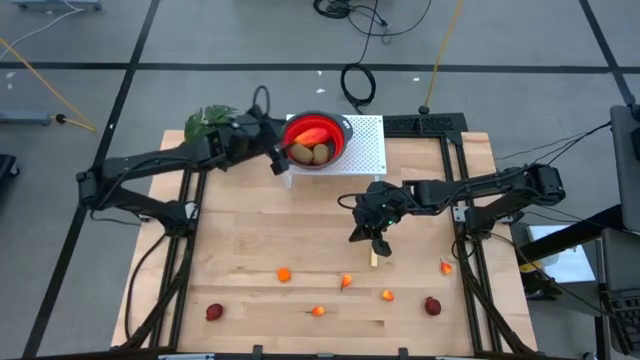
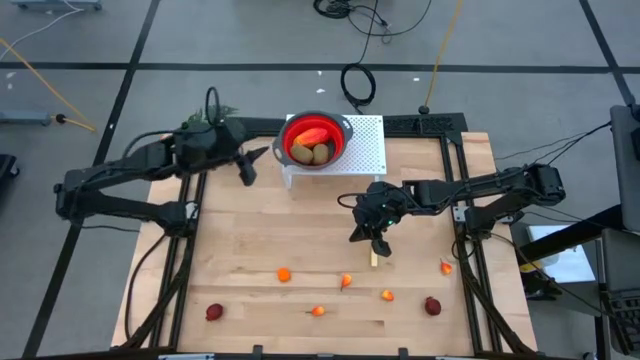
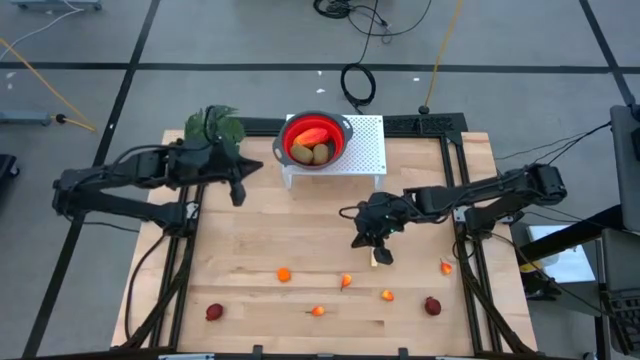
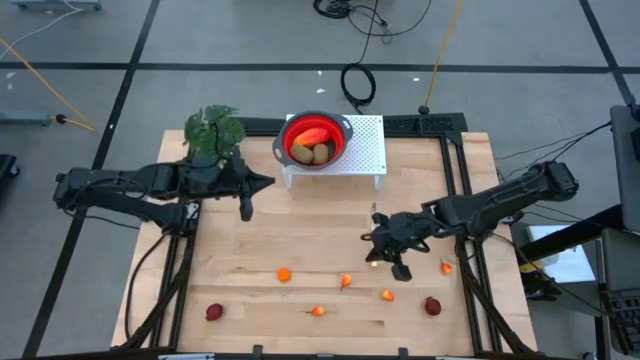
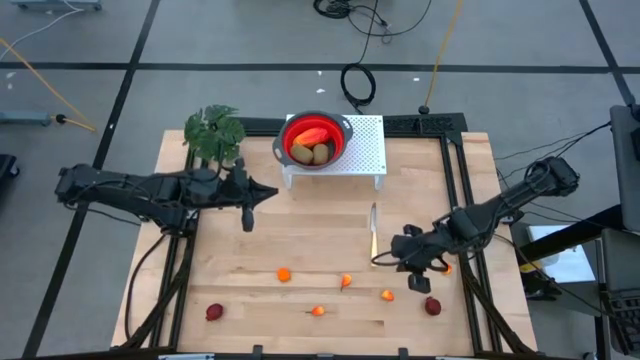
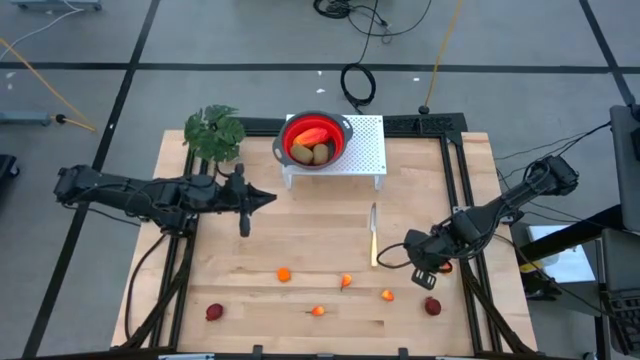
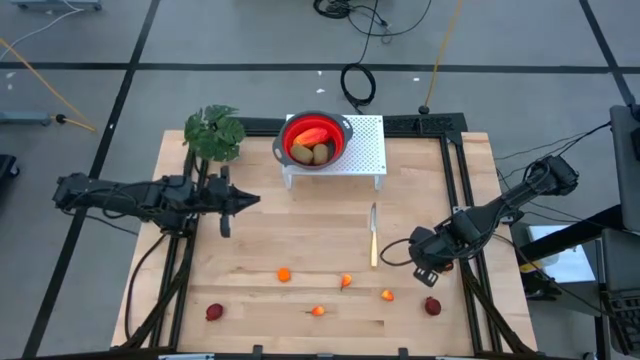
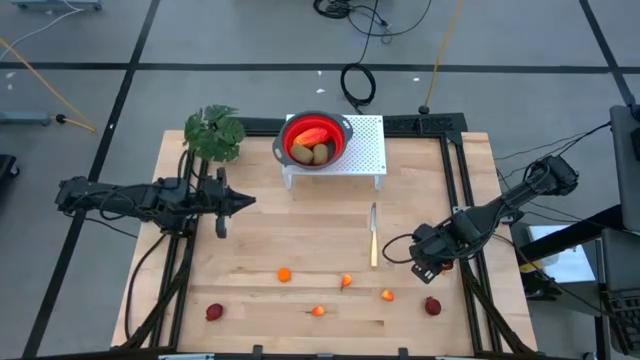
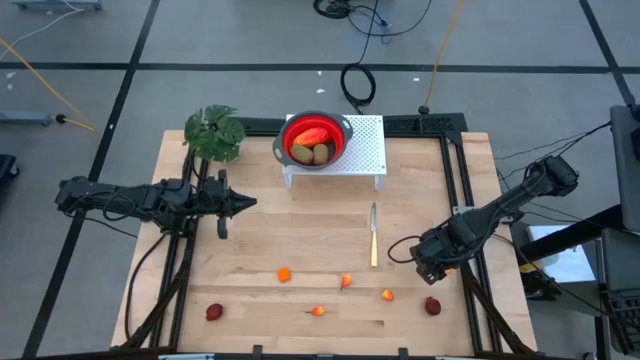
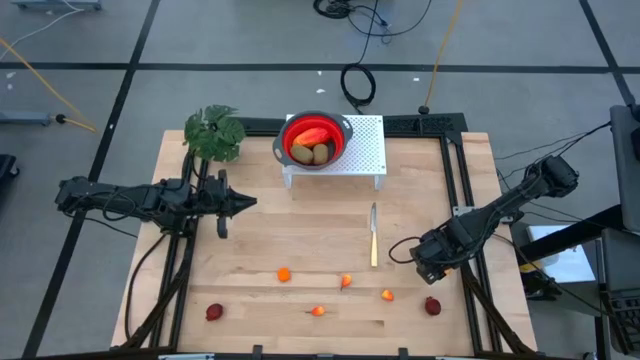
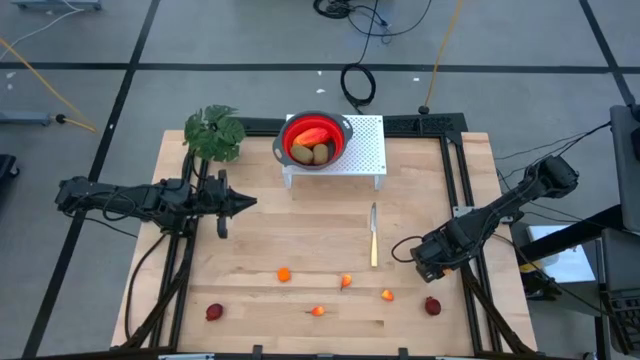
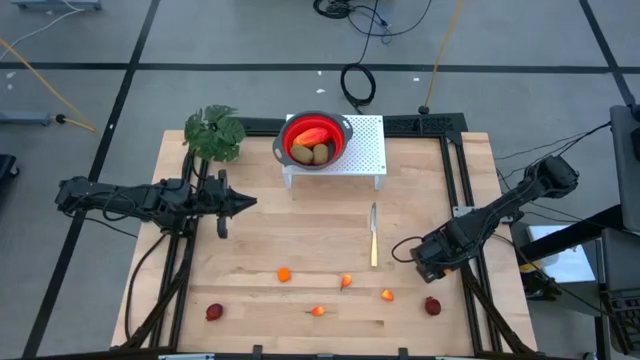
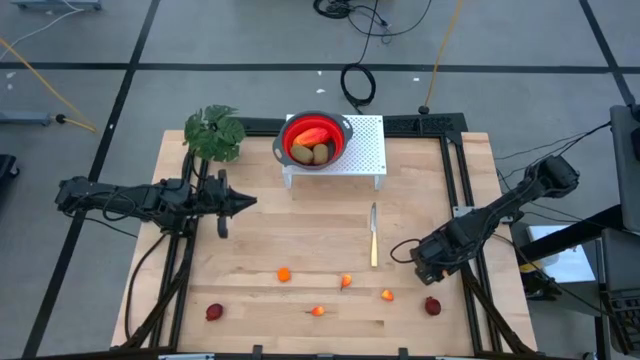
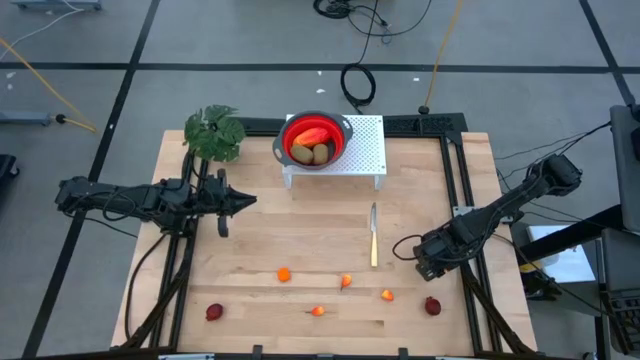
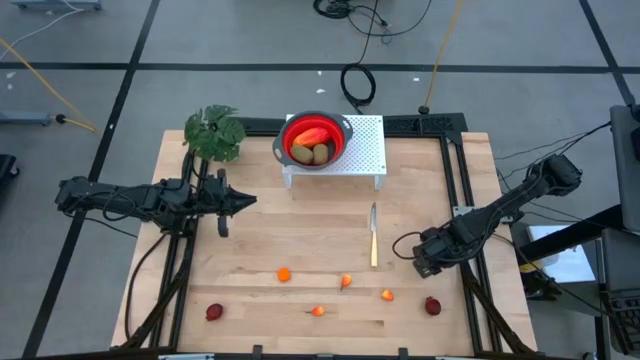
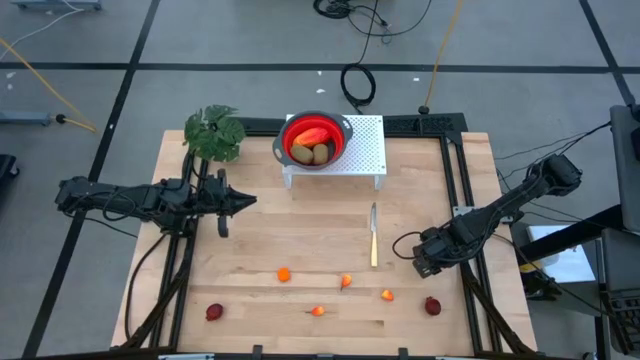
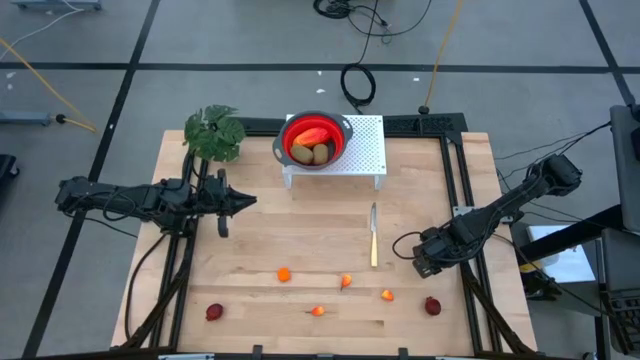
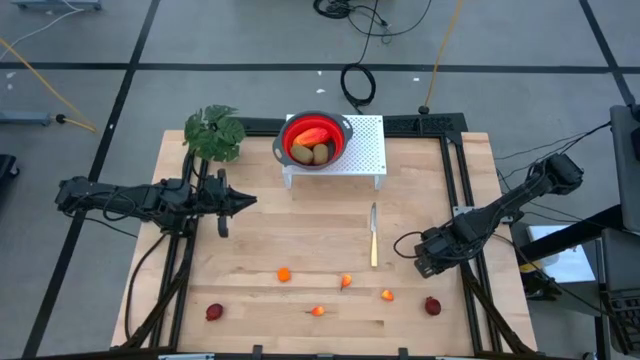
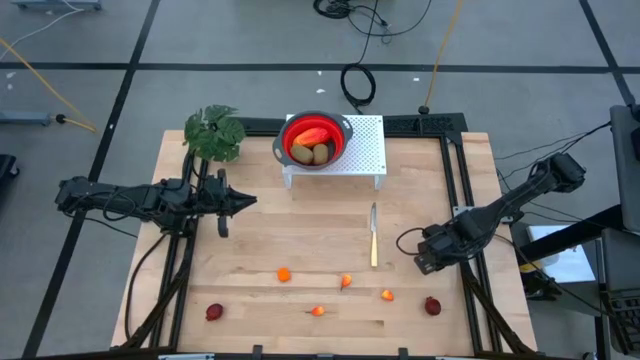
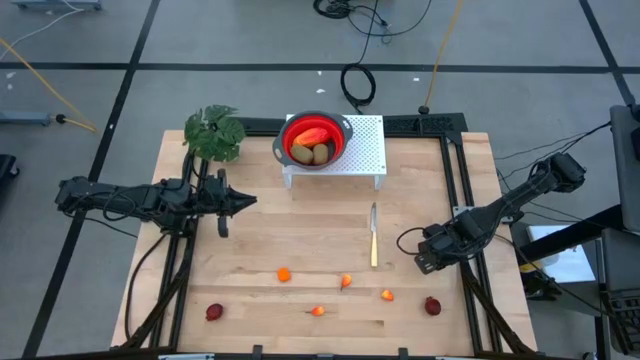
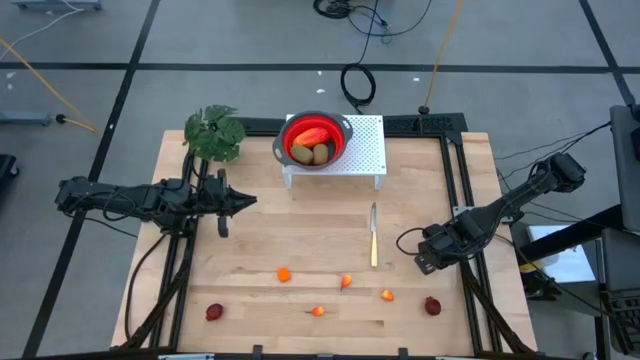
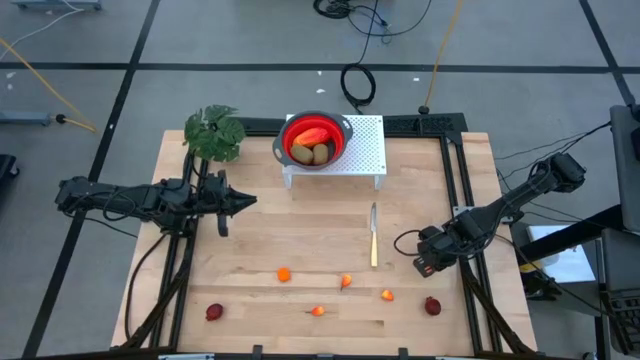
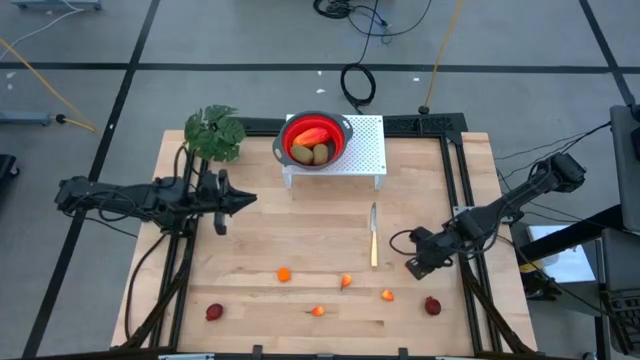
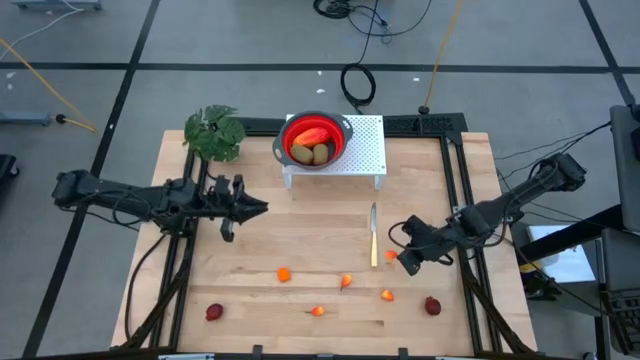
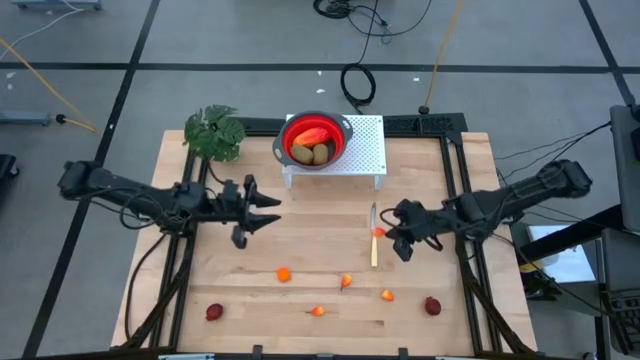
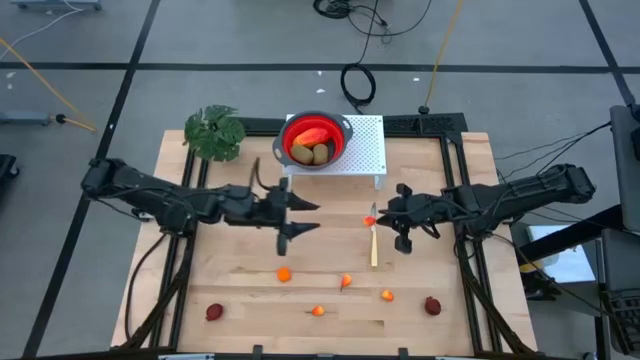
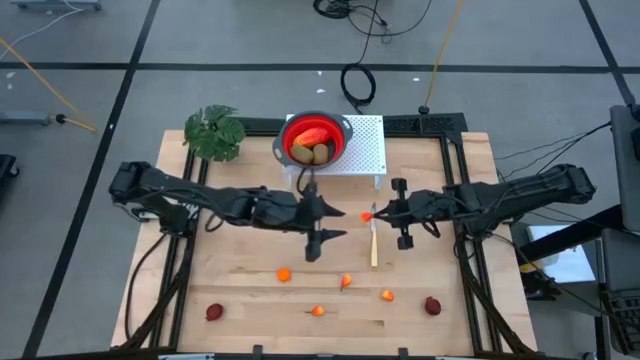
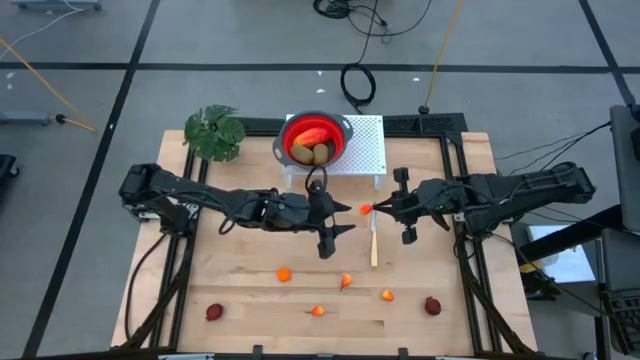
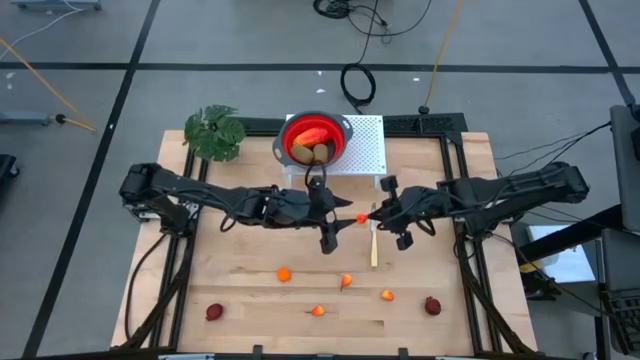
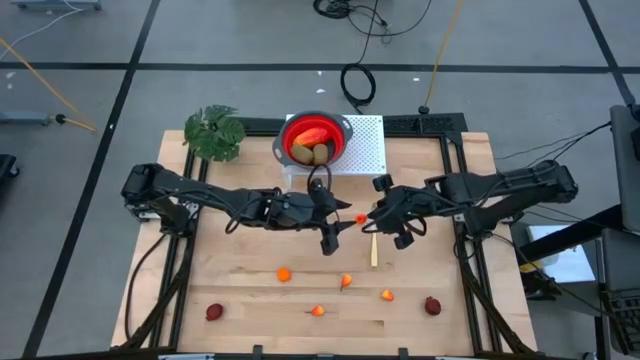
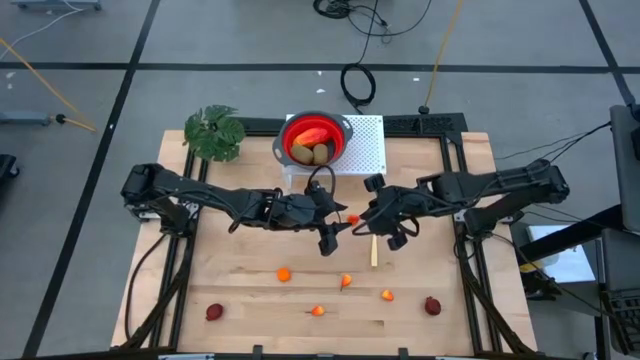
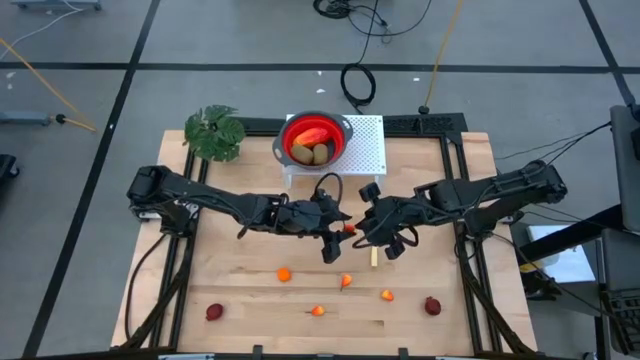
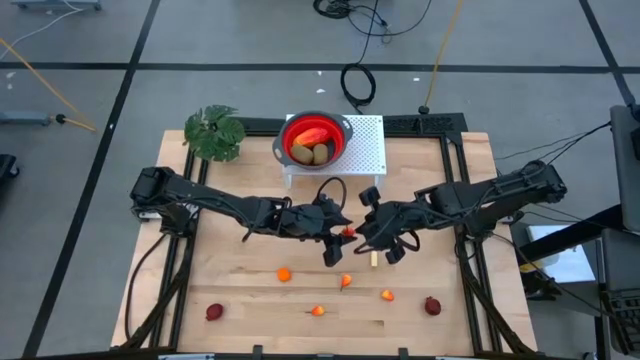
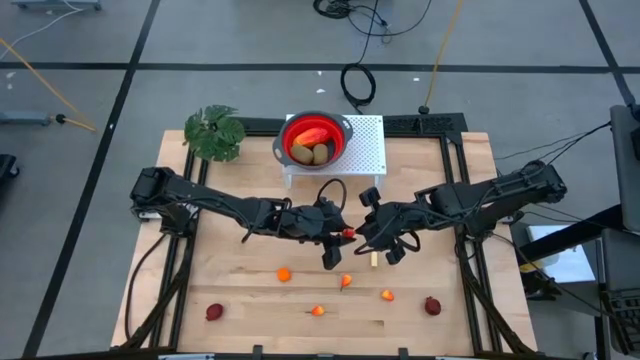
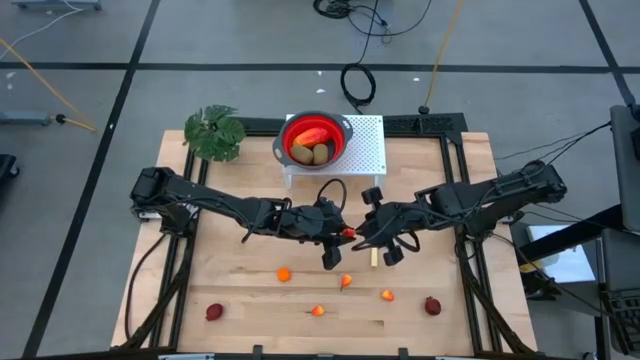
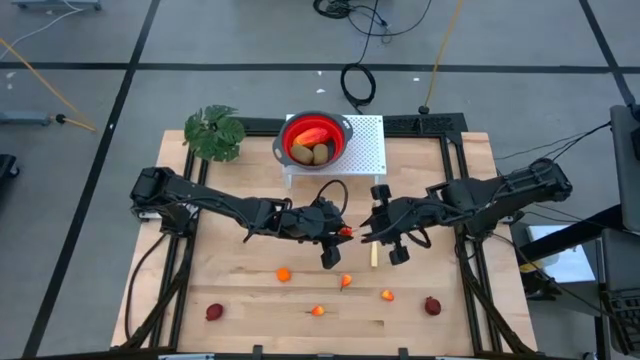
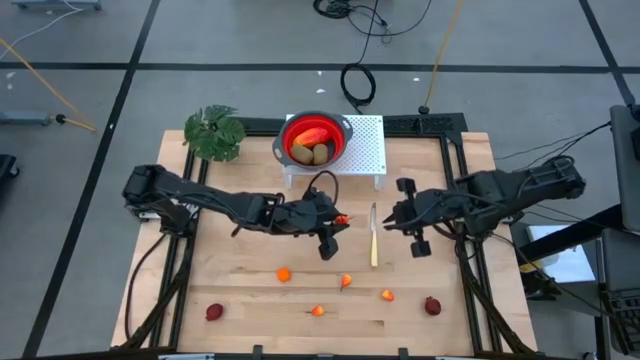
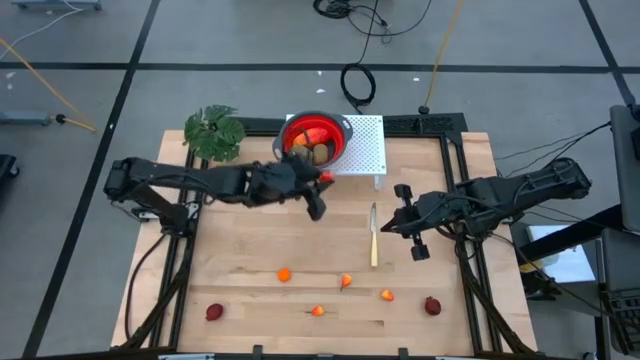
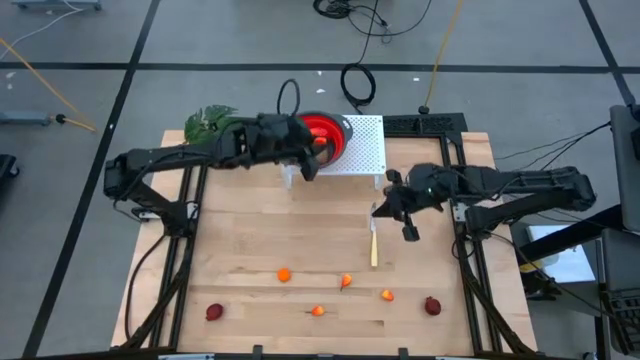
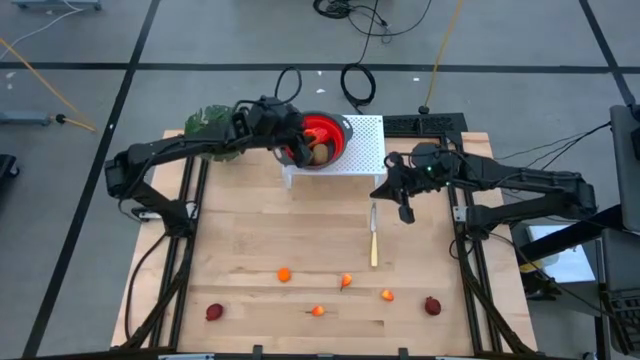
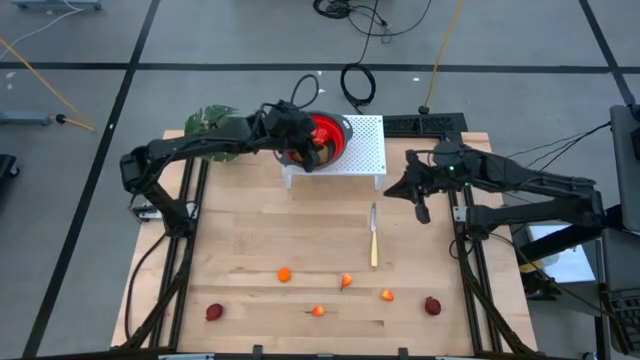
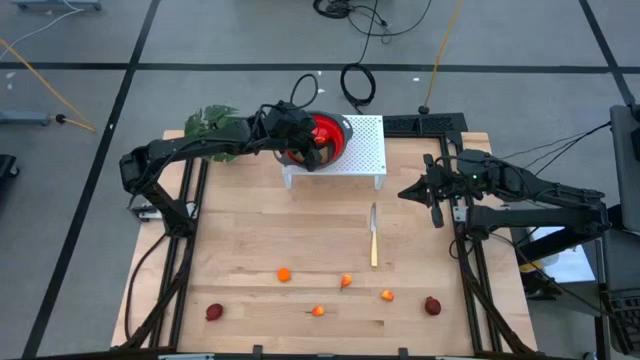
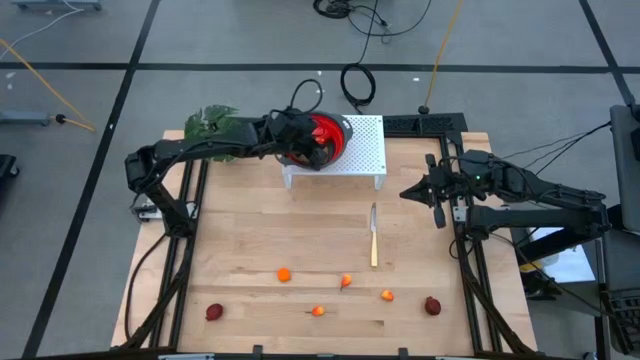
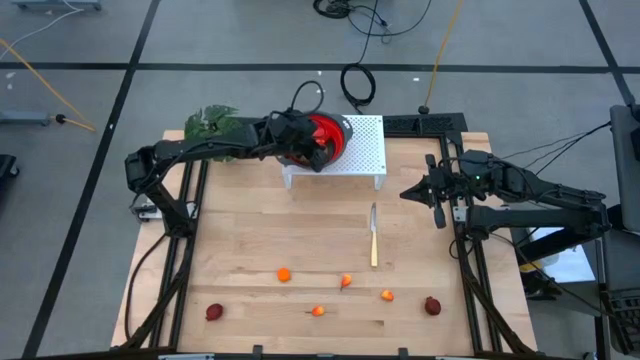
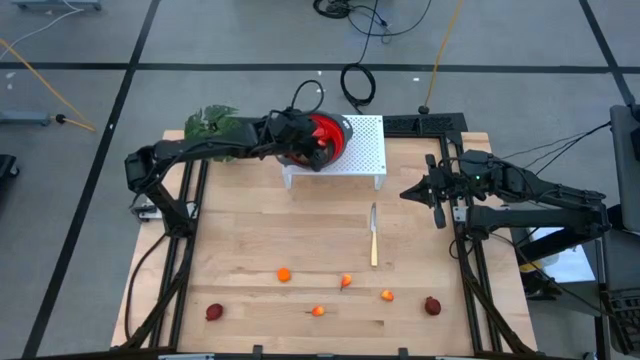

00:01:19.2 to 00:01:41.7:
Task: Pick & Place Fruit
Put the orange pear into the red strainer bowl on the shelf
